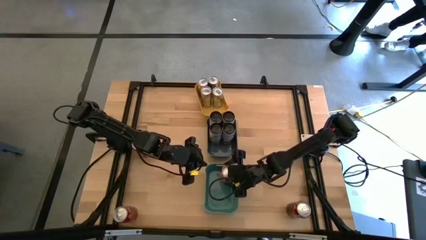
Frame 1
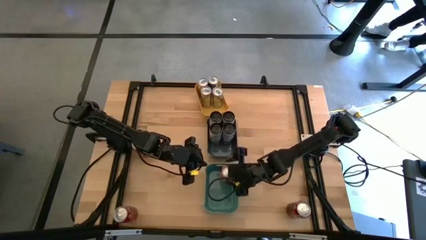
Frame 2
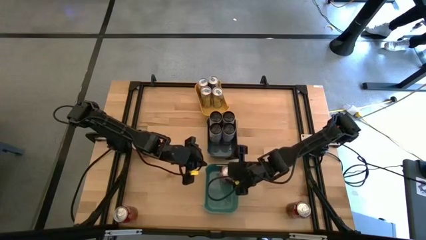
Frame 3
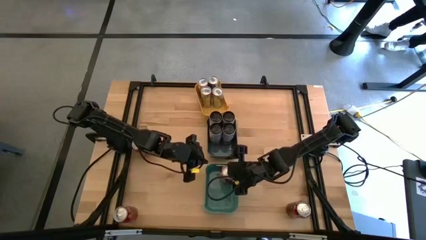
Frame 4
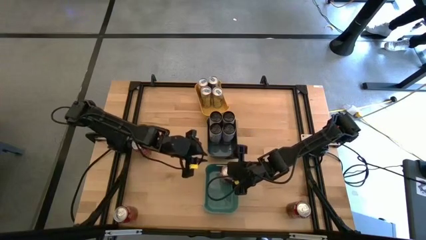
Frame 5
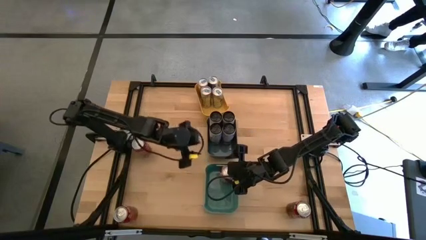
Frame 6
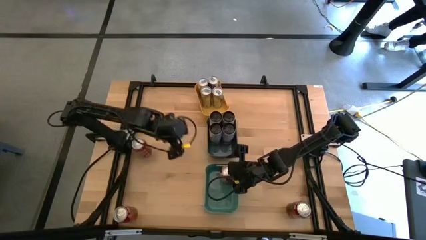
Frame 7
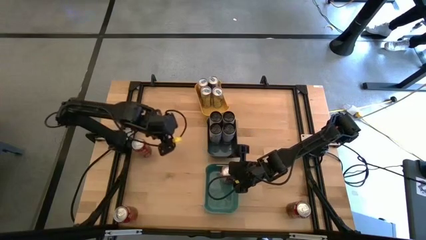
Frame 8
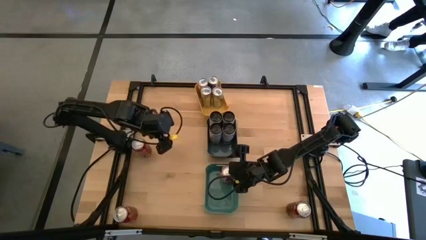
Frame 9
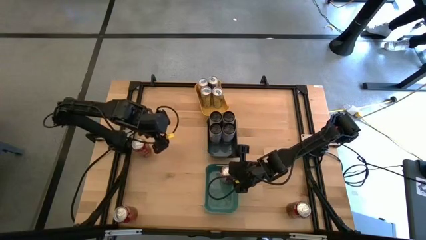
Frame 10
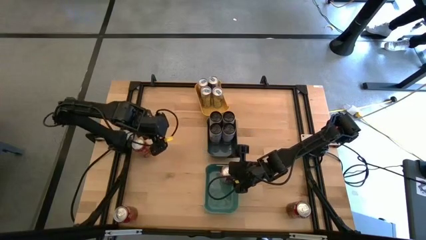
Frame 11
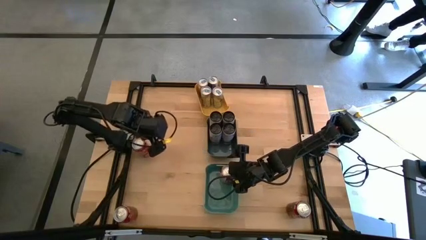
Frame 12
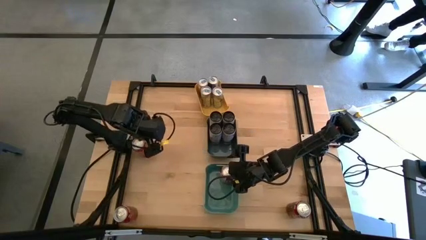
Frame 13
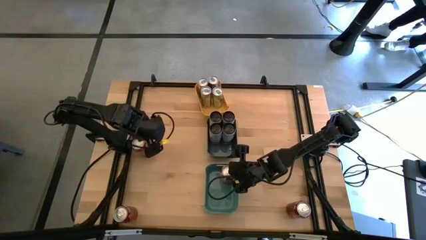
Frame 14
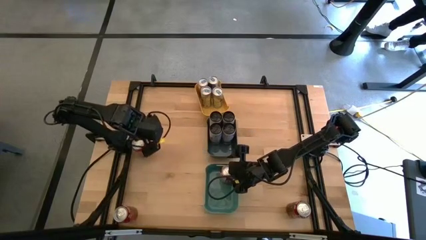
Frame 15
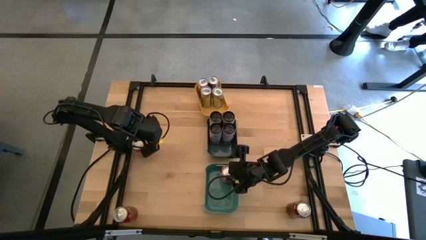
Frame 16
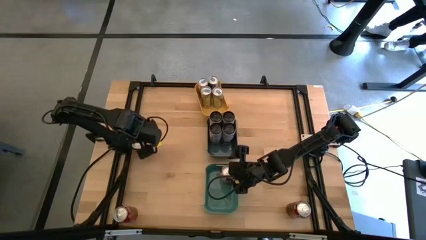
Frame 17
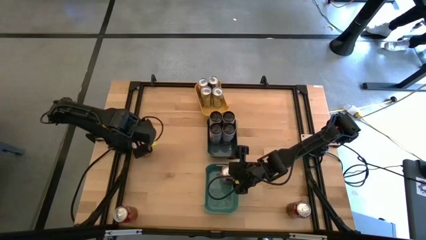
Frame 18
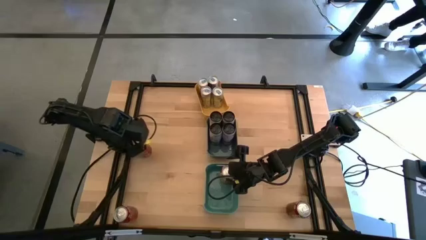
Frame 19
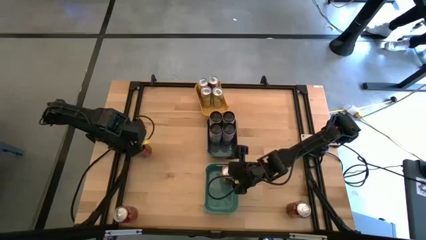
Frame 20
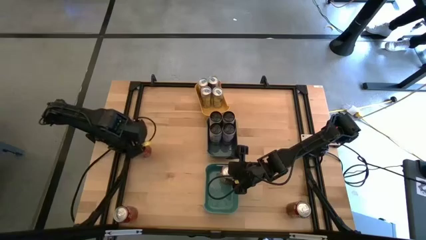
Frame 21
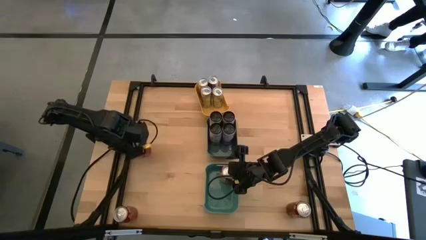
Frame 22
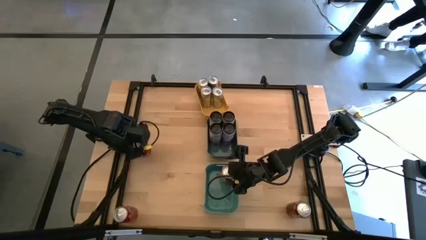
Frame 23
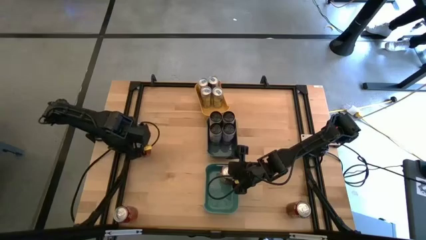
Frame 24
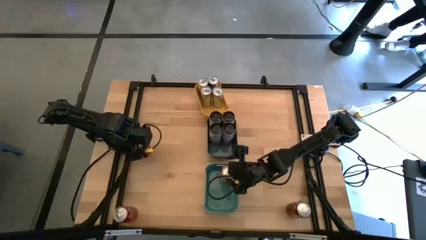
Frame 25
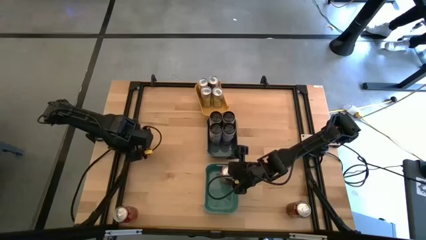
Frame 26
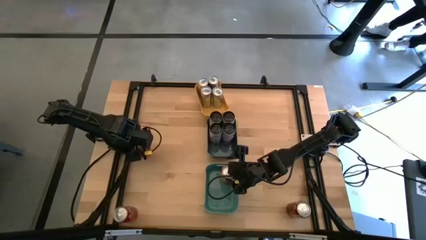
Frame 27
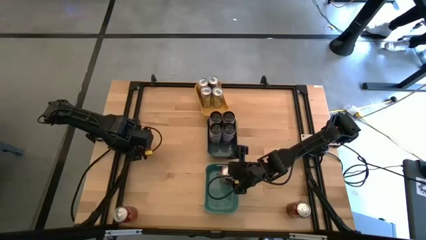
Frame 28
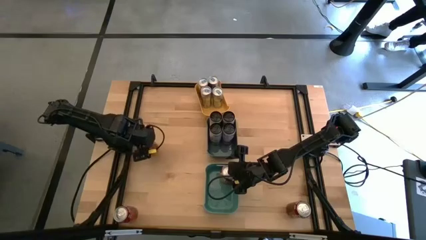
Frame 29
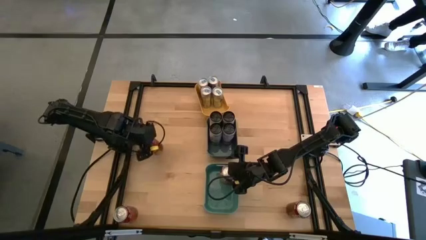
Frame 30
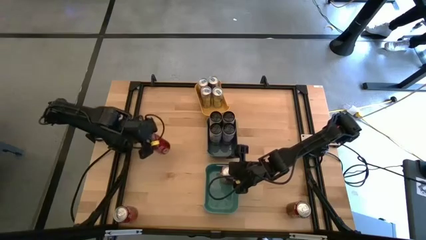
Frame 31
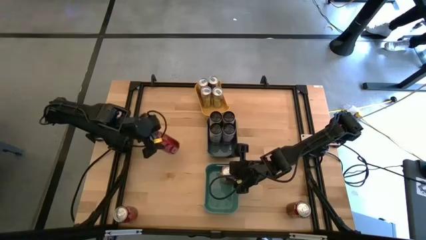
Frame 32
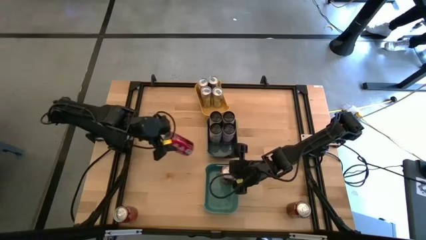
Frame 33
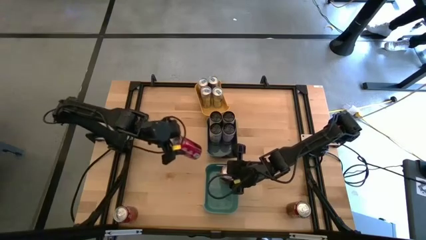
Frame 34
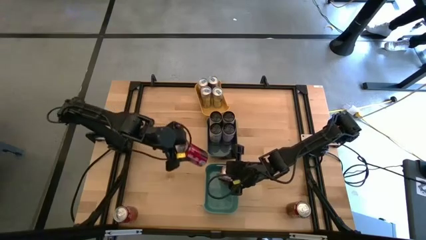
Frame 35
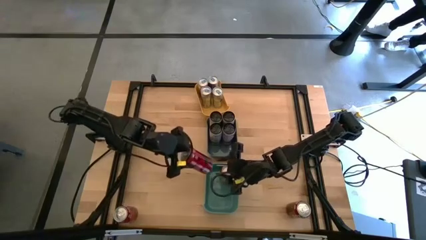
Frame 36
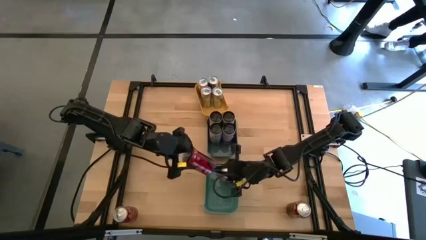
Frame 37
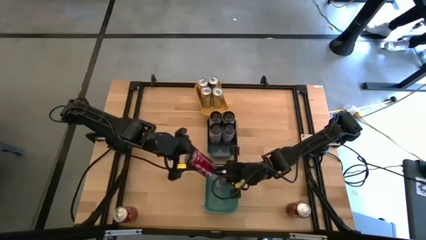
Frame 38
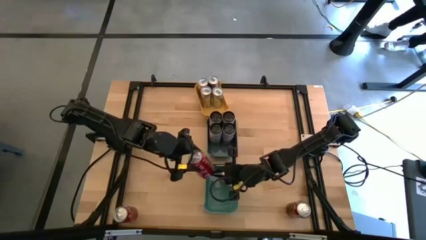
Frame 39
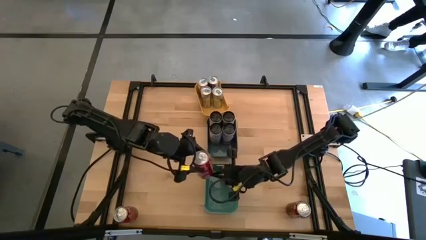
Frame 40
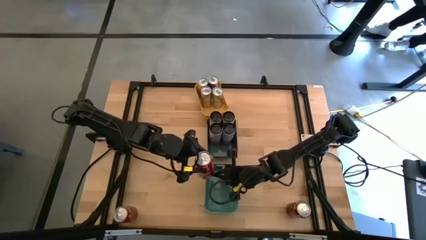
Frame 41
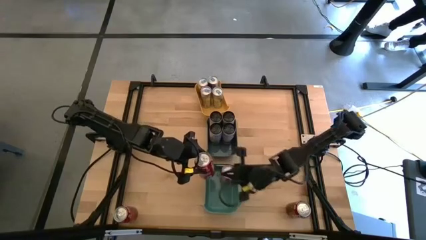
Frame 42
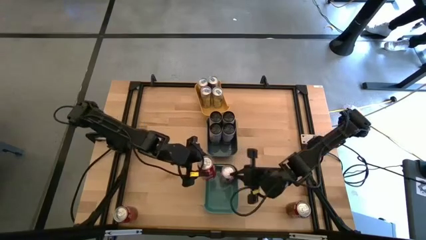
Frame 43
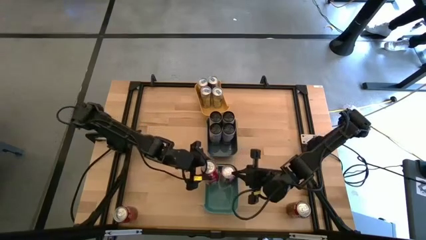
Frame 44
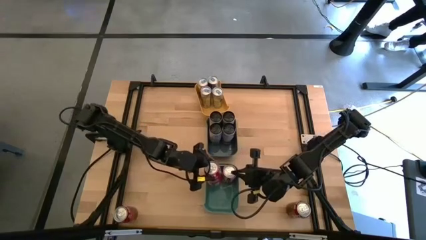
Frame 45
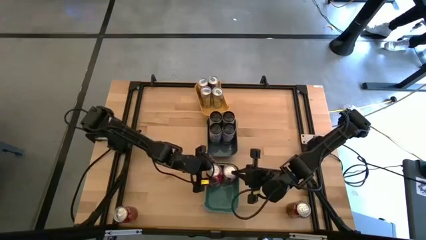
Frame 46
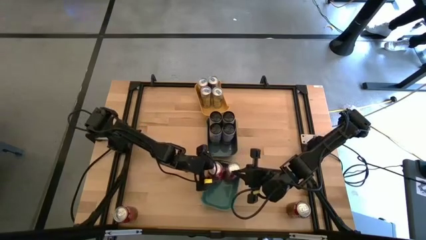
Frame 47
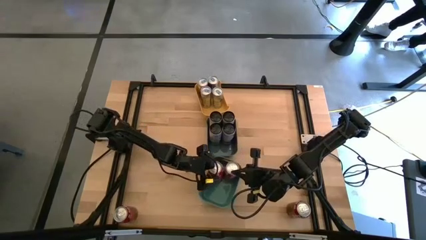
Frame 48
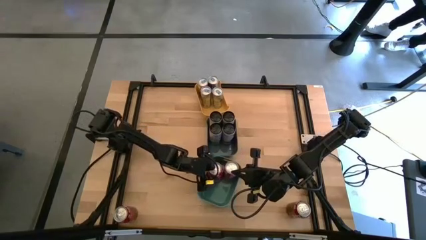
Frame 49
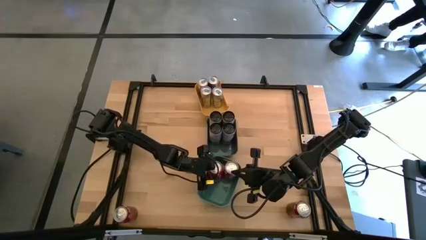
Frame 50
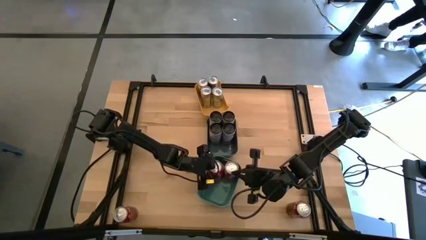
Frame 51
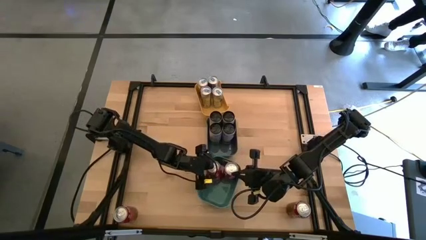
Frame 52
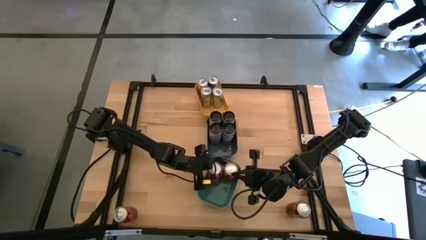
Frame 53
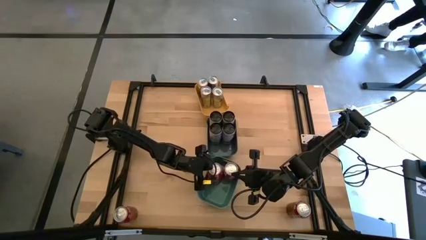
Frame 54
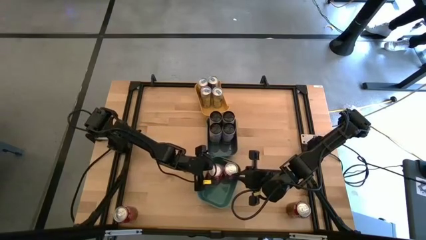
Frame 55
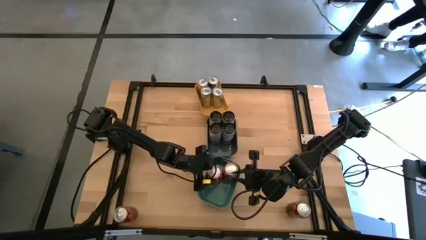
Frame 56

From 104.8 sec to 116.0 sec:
Task: Sort soda cans
Put the top right red soda can into the green bin
